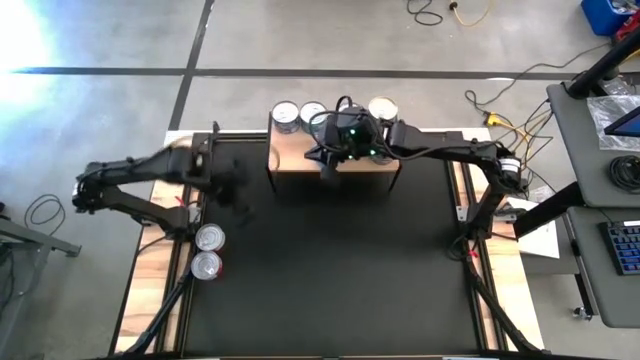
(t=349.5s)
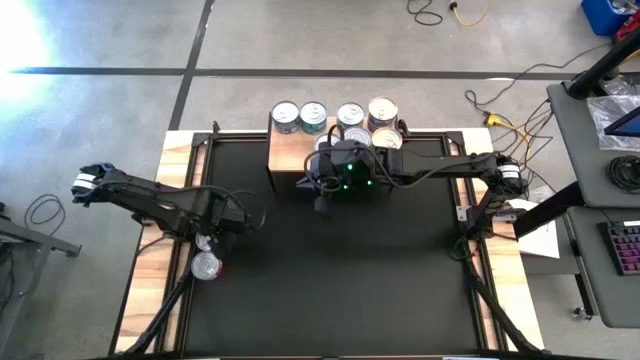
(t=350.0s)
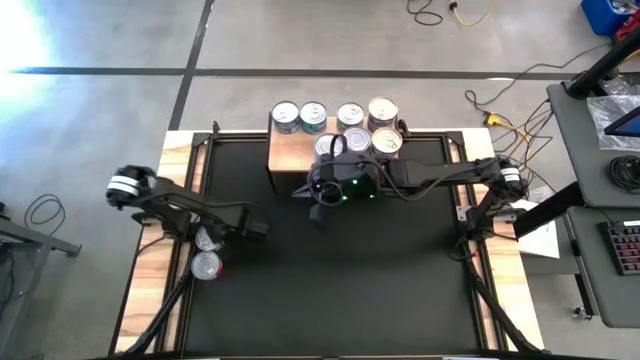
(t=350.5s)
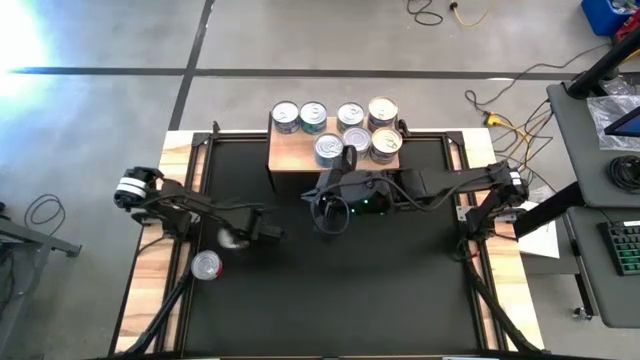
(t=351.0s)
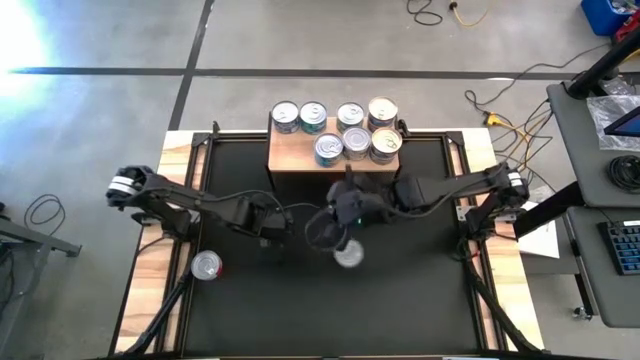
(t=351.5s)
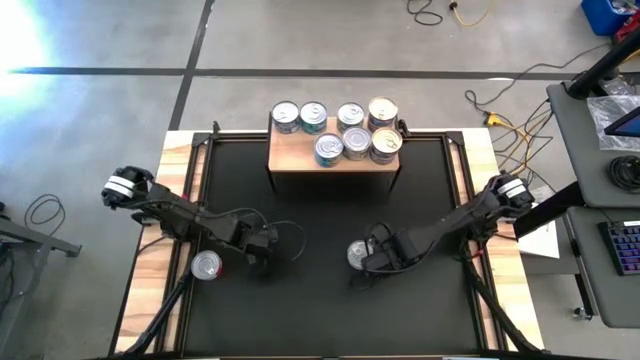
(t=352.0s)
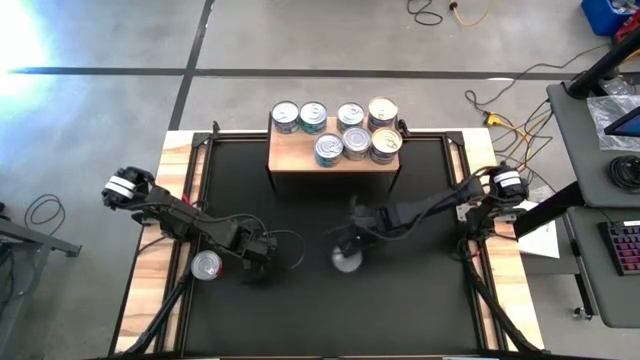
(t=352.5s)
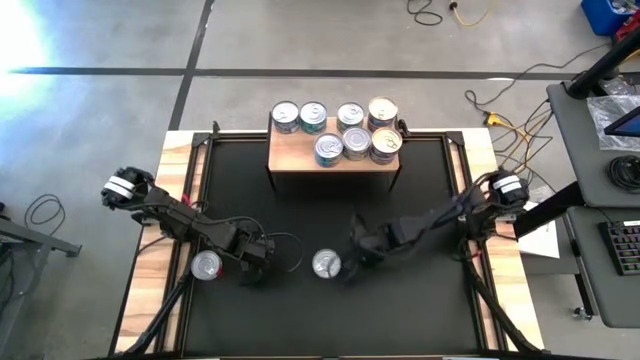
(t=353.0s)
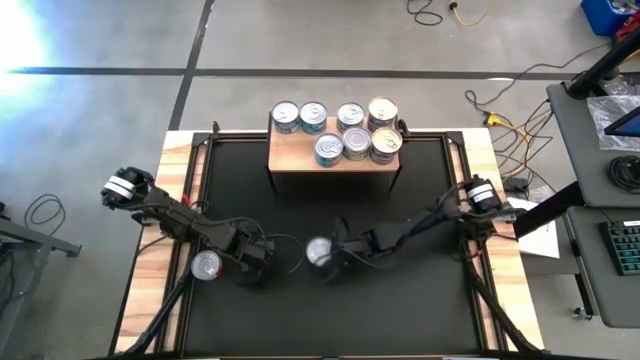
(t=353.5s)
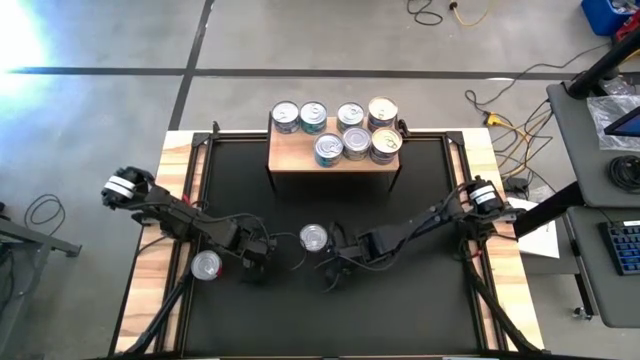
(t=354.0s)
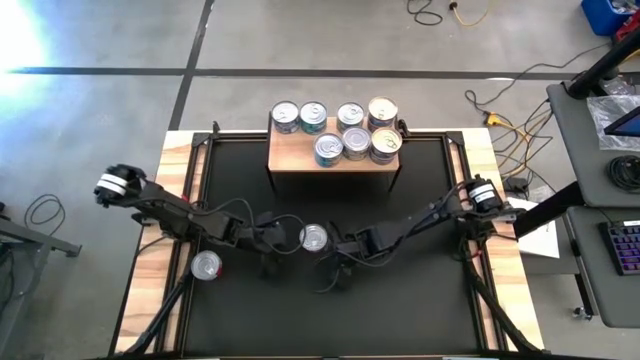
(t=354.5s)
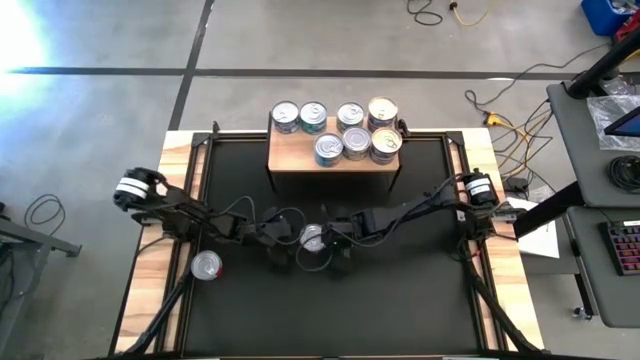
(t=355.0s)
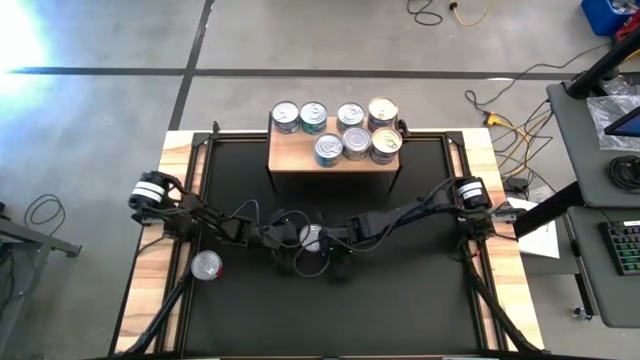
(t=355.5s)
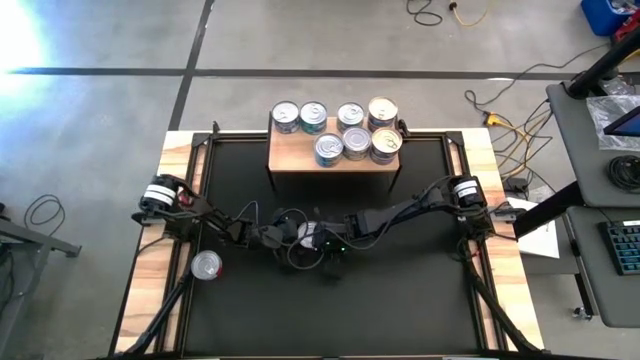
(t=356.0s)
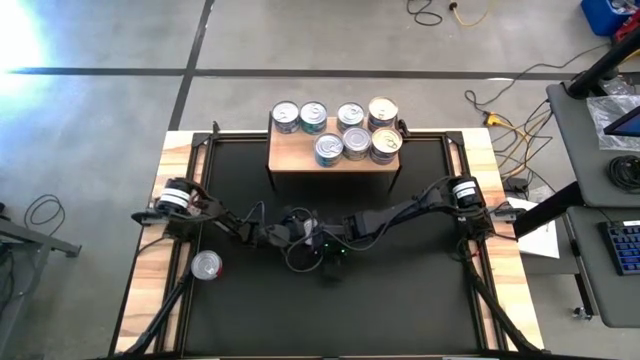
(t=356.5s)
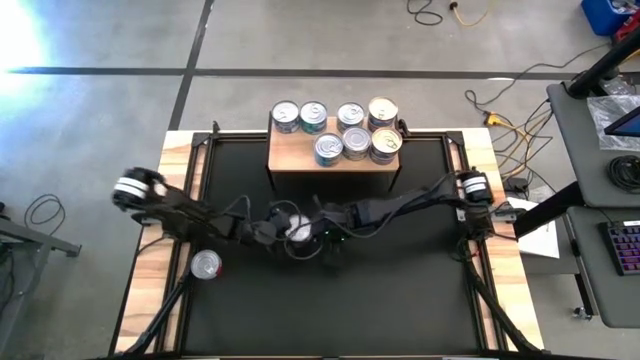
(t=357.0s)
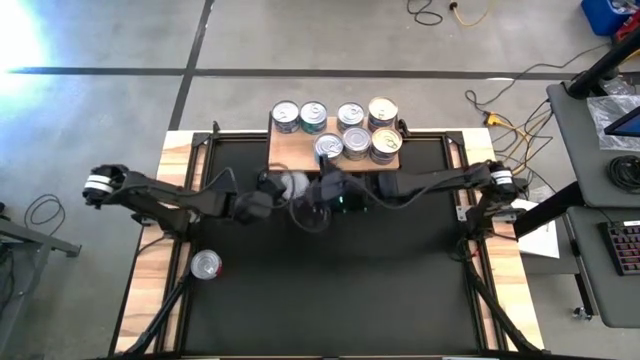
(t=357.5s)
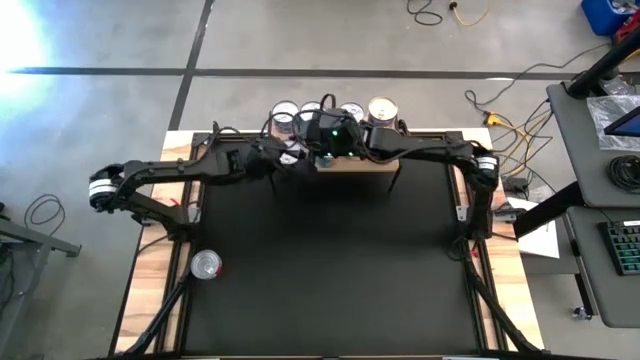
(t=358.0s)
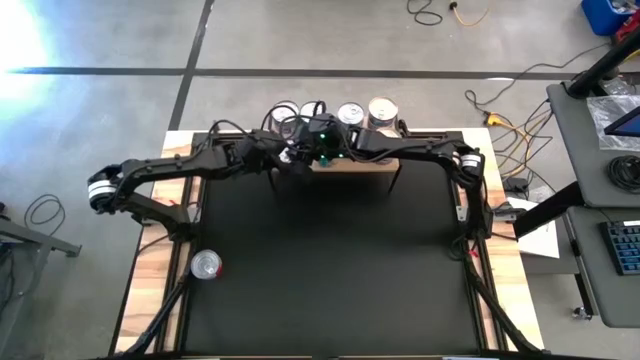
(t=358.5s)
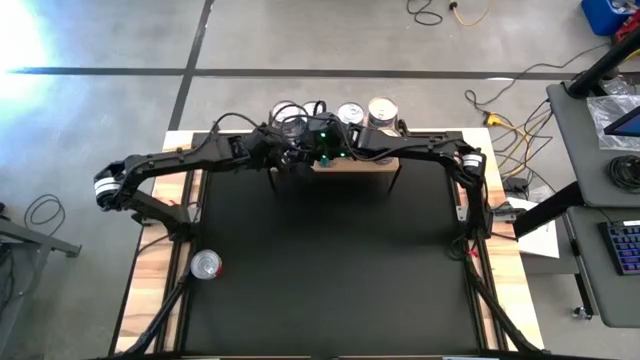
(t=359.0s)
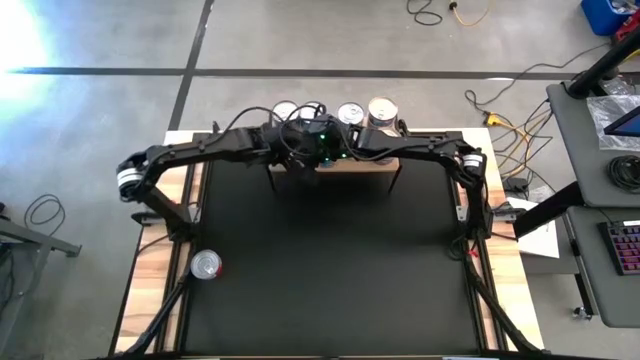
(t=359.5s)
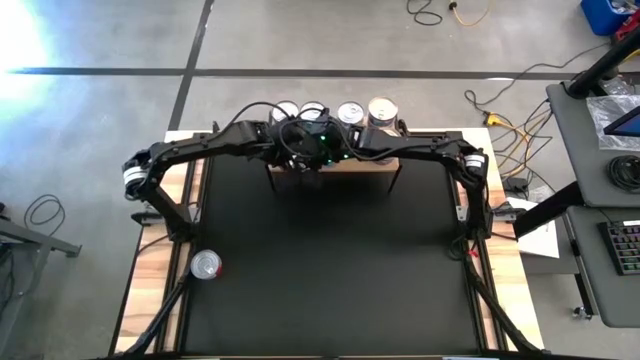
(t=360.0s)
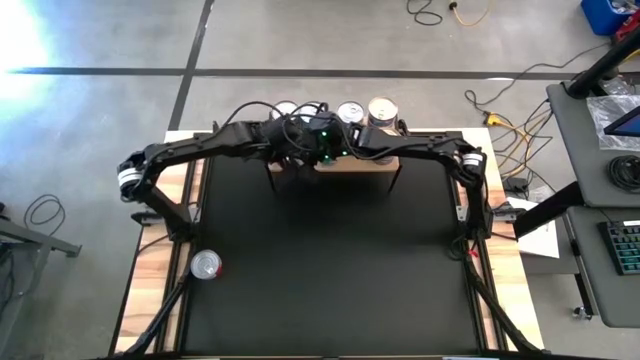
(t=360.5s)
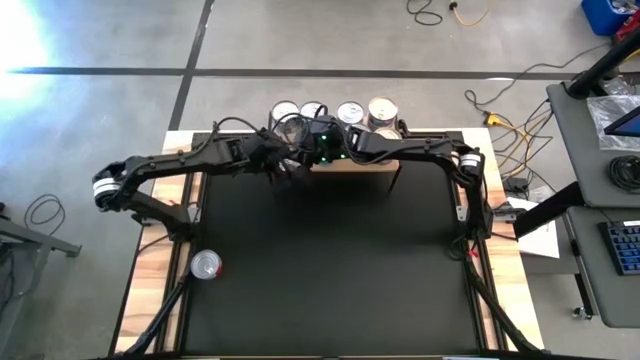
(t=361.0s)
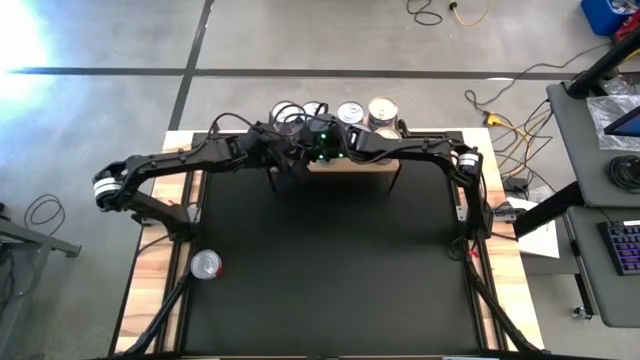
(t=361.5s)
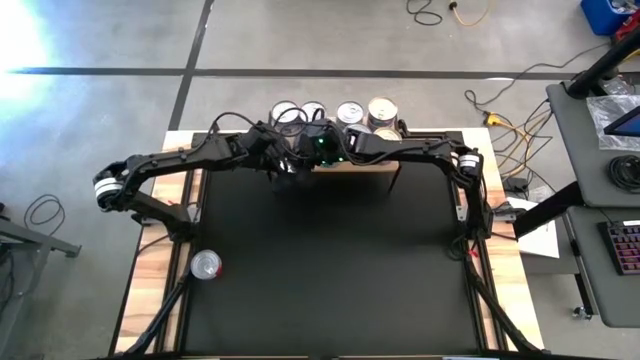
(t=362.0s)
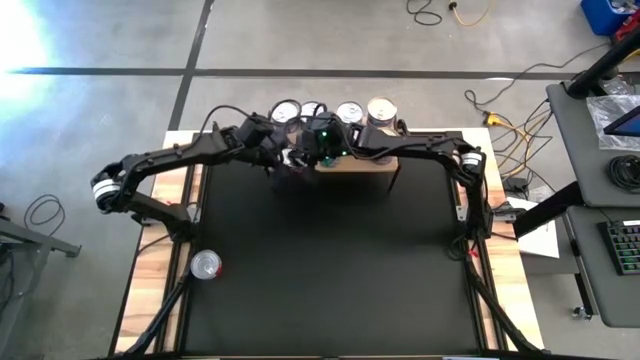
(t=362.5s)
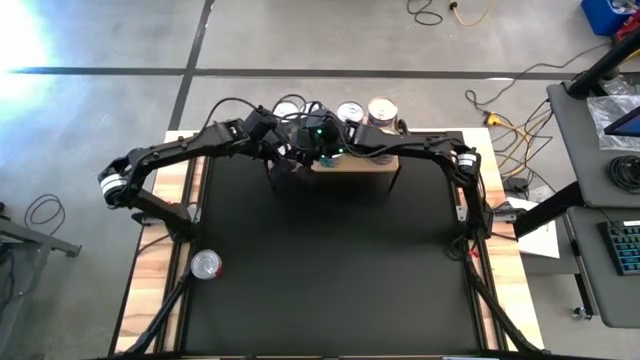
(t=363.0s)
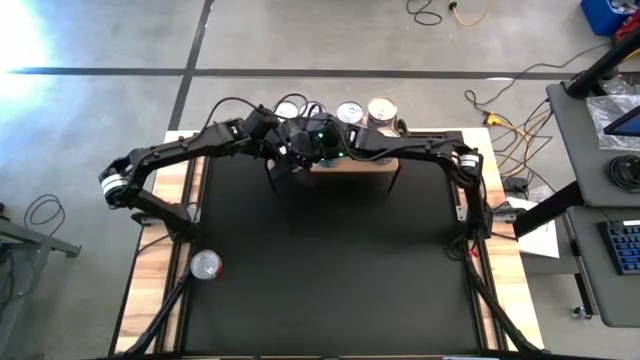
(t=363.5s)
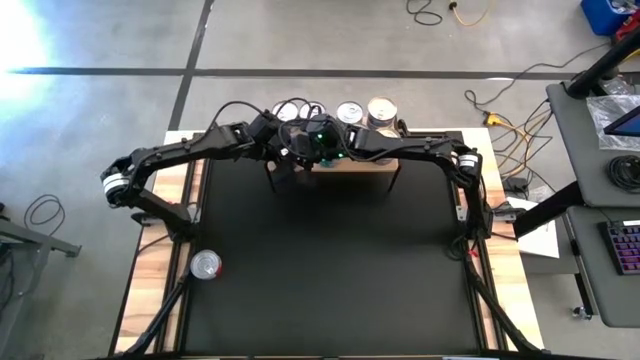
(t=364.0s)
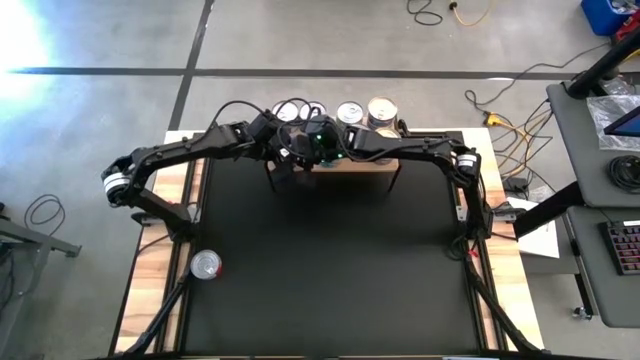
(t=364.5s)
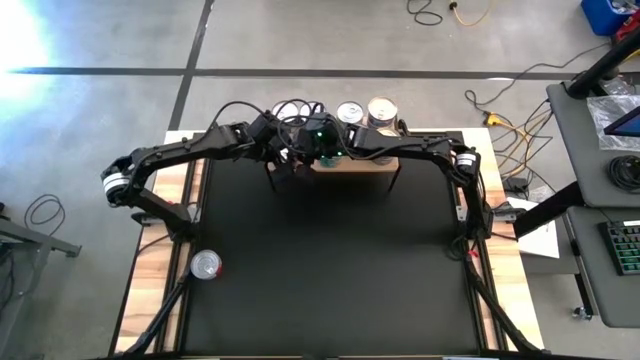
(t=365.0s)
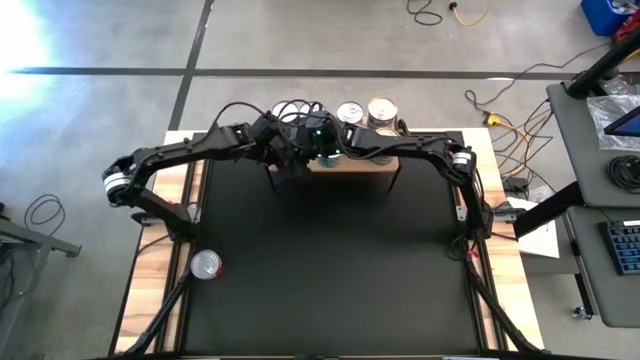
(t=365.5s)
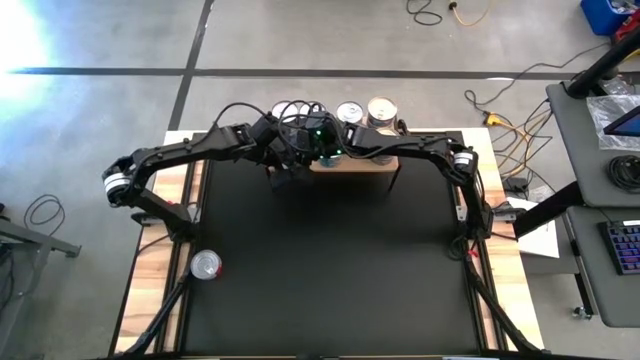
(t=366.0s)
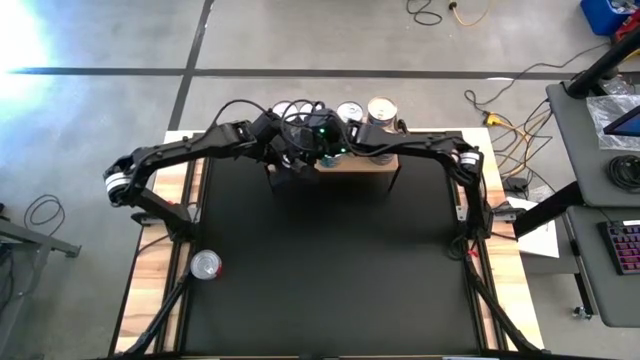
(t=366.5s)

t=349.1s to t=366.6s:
Task: Stack canned seafood by type on shelf
Put the top red tuna can on the shelf

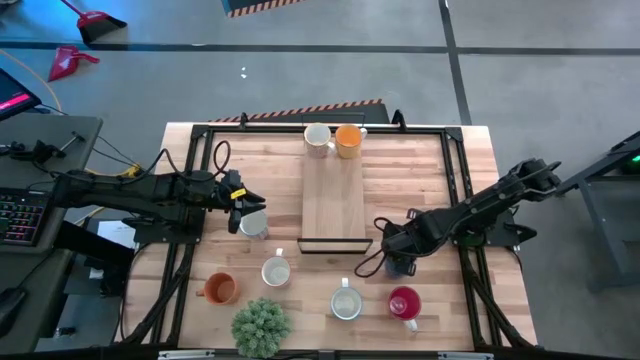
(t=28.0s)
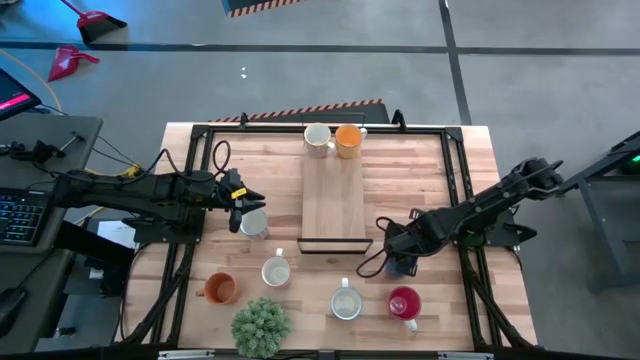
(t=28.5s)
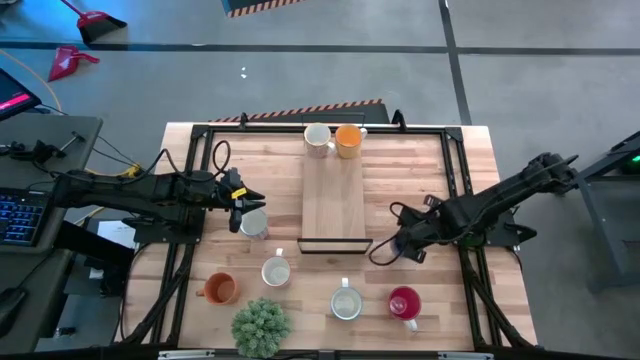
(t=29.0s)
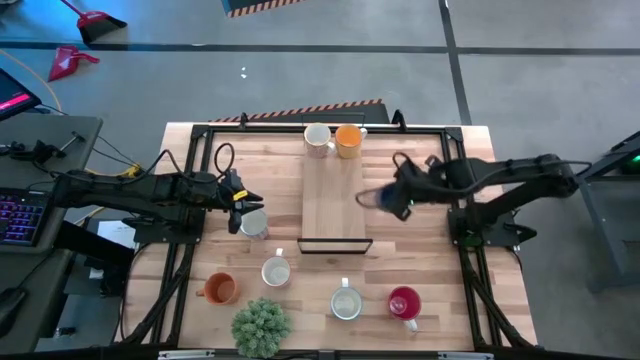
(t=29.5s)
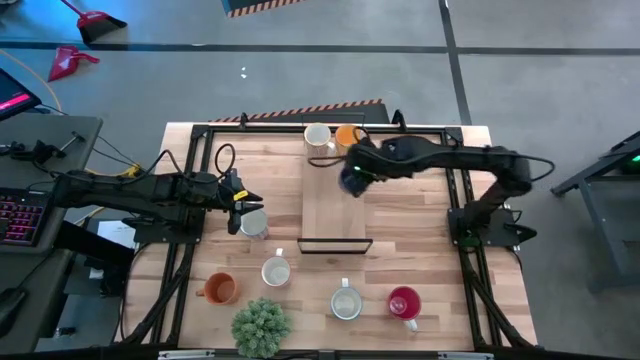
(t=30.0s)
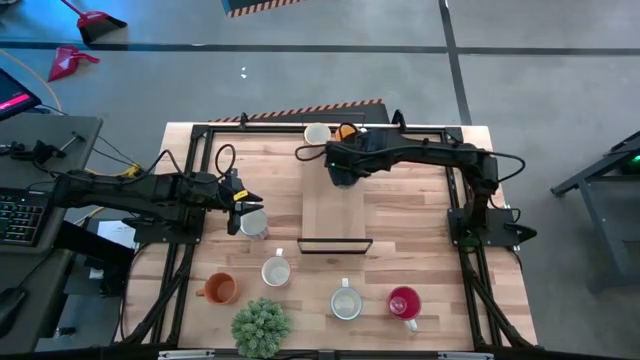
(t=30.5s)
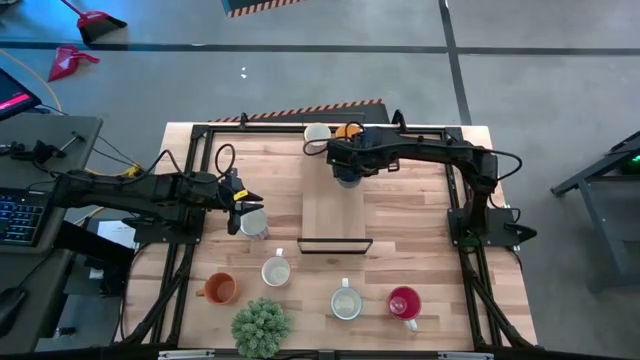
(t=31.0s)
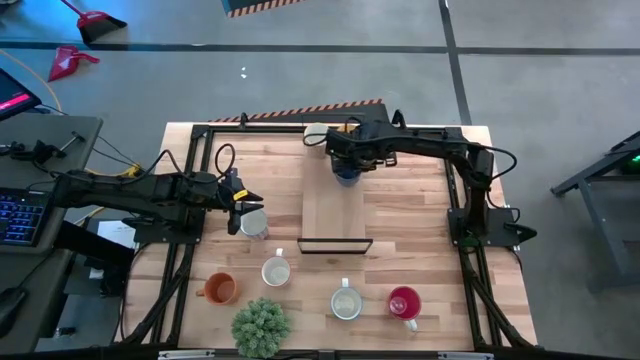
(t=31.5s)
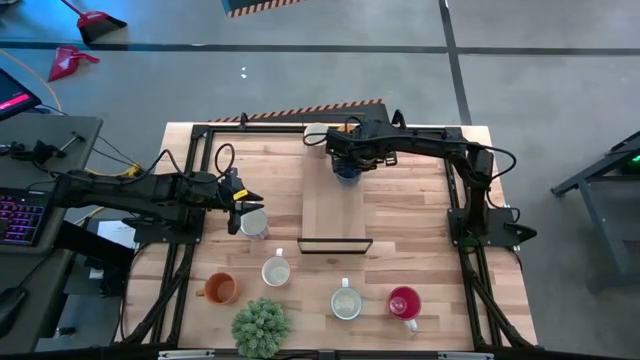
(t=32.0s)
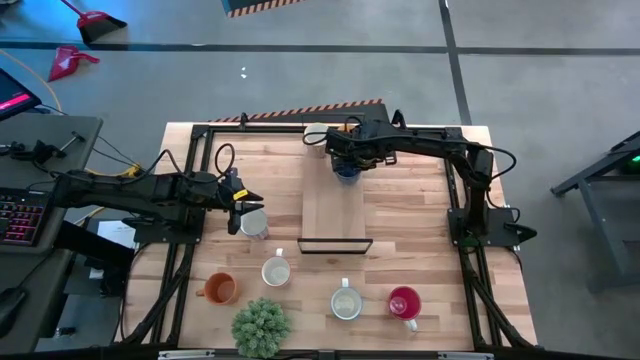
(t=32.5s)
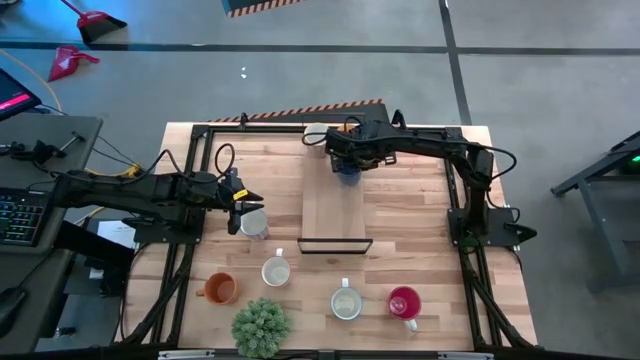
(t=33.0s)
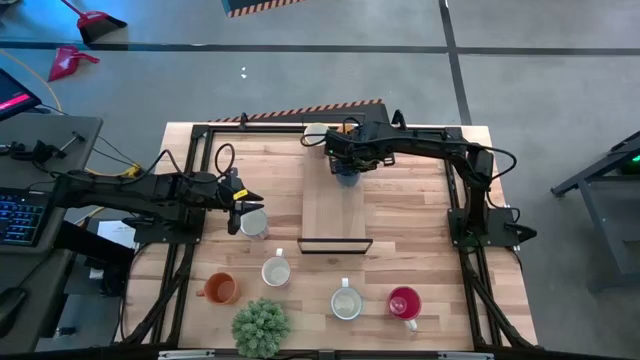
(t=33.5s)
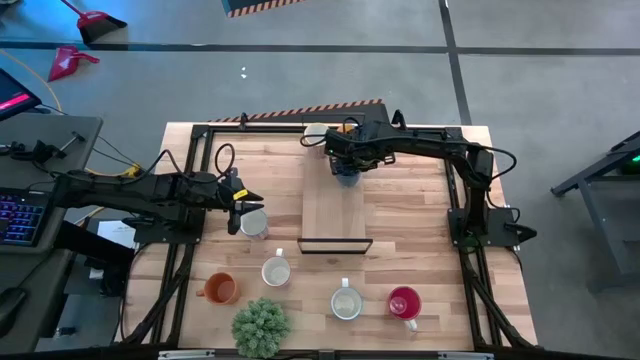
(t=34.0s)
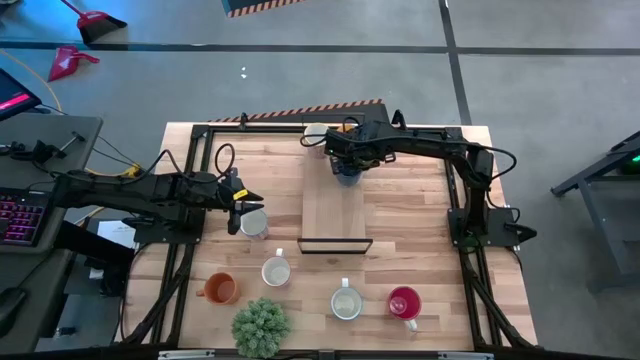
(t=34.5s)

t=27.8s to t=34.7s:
Task: Place coffee mugs
Put the blue cup on the shelf
